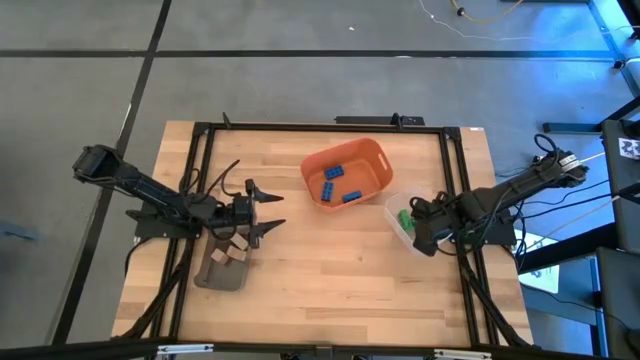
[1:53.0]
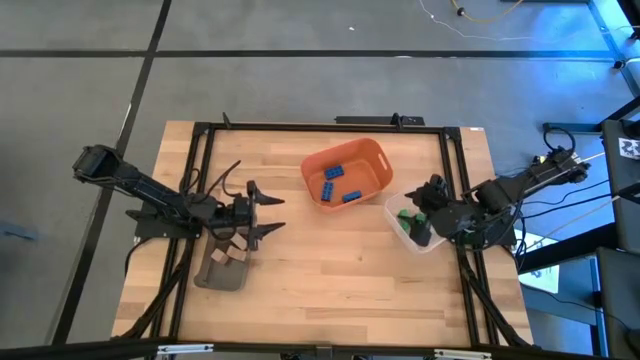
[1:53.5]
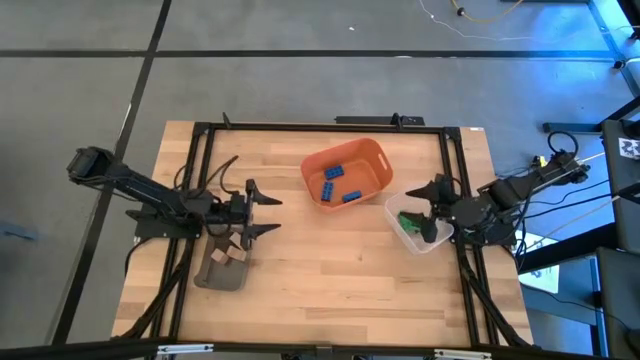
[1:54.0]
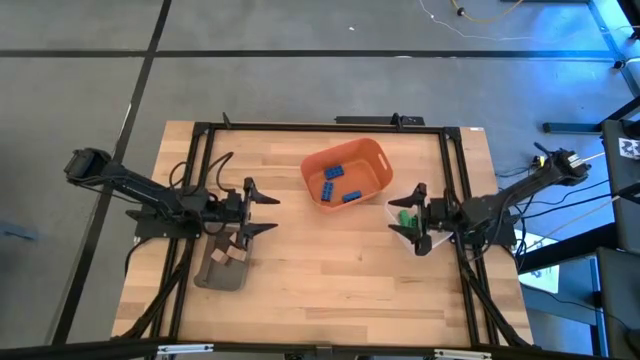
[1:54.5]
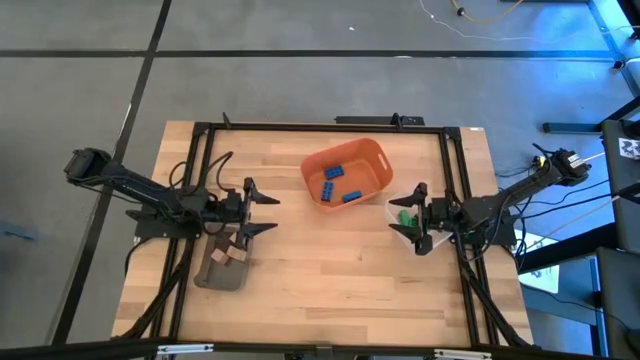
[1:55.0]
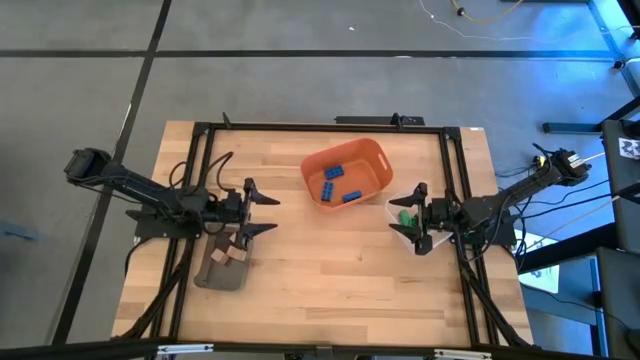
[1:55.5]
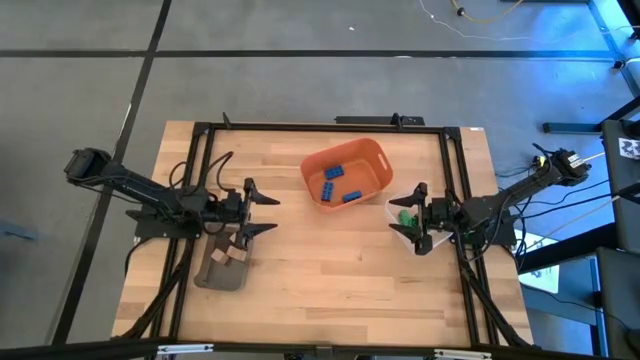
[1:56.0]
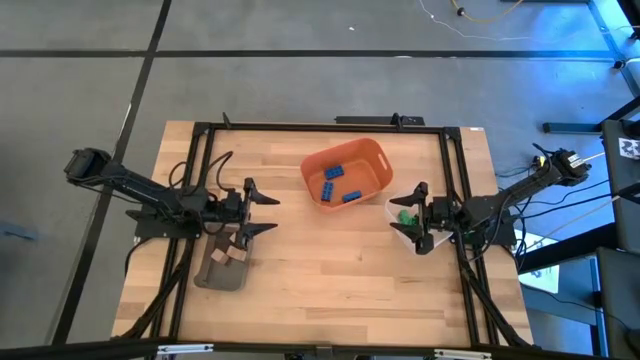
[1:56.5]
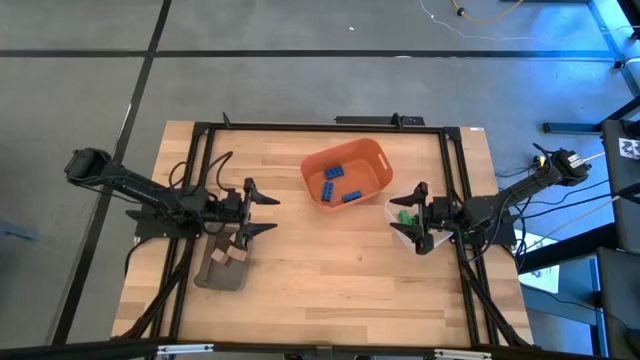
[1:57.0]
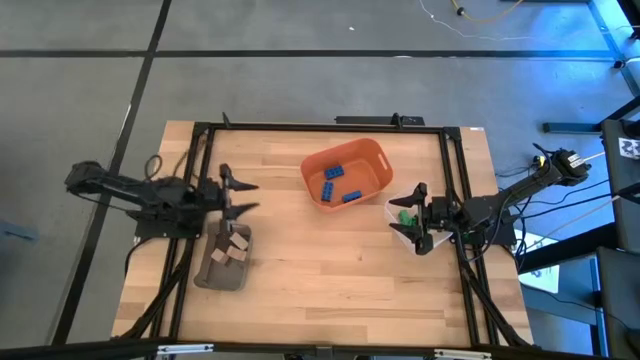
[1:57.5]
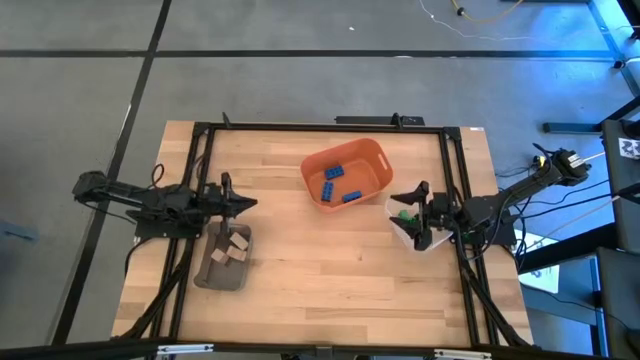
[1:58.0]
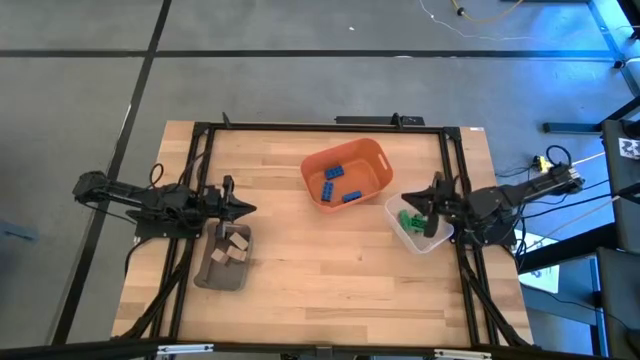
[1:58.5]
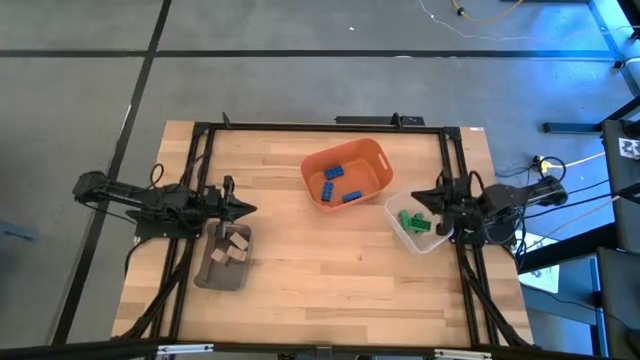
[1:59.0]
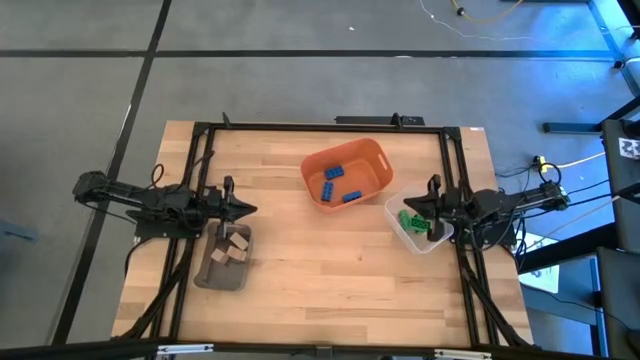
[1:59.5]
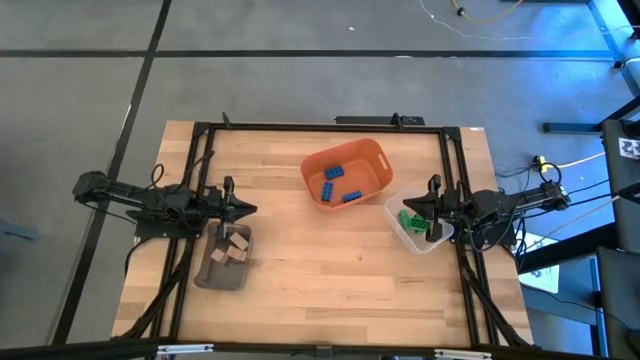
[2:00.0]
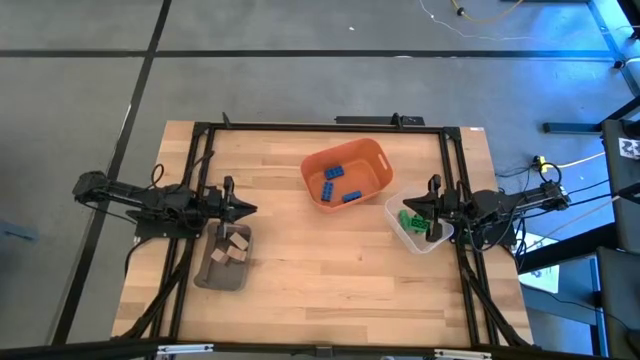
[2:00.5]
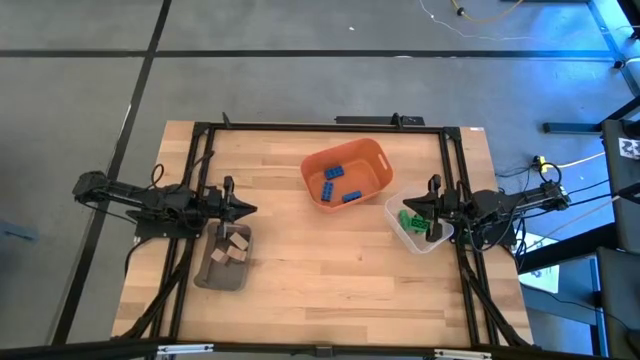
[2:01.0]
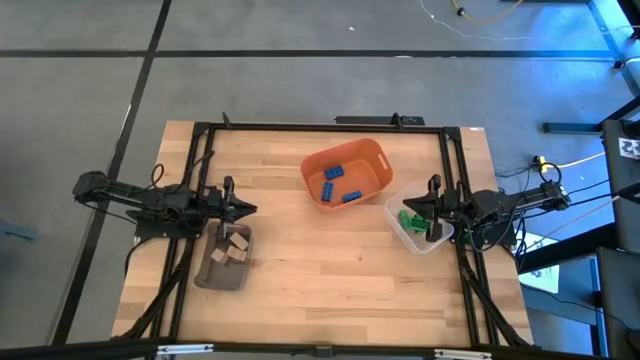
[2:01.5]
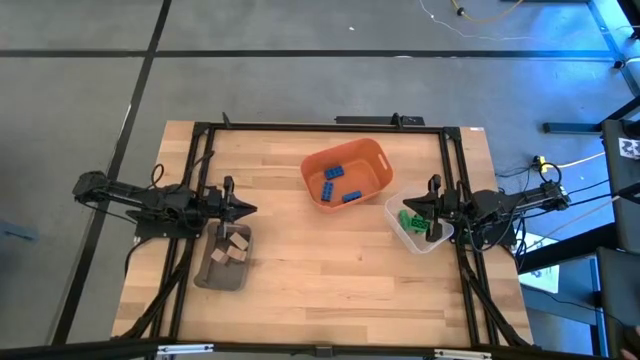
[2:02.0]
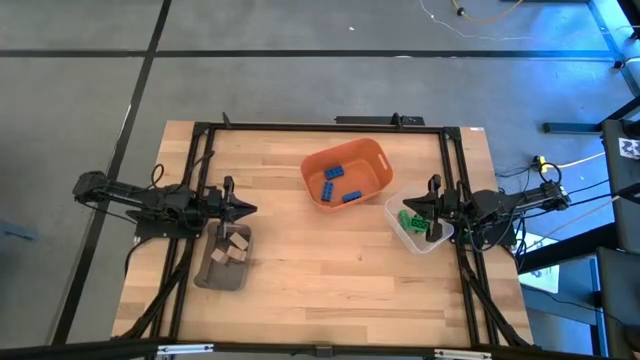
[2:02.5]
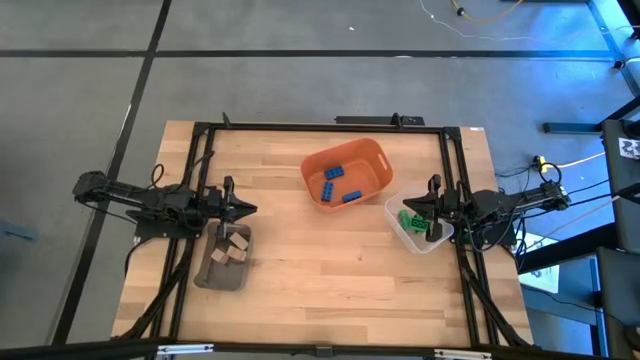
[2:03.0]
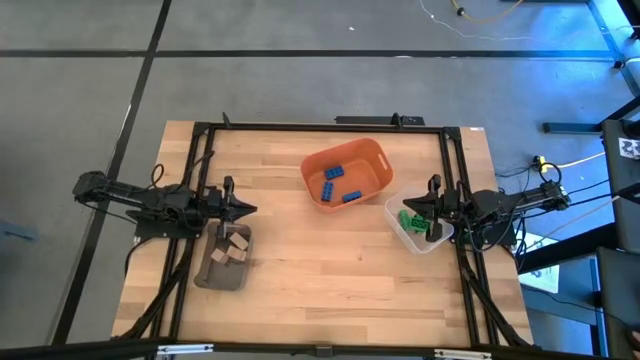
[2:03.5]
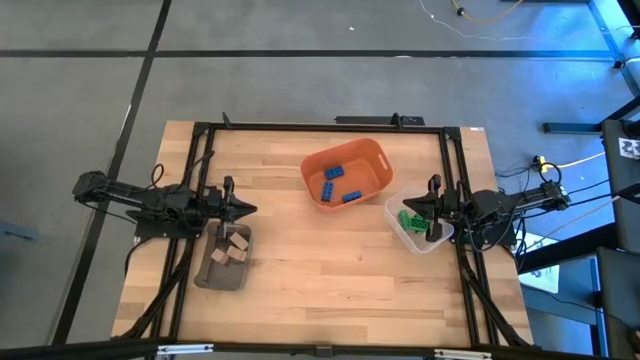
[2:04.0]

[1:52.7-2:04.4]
Task: Sort & place blocks by color
Return to Home Position

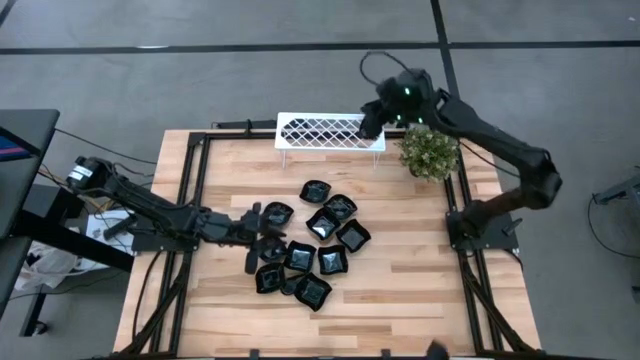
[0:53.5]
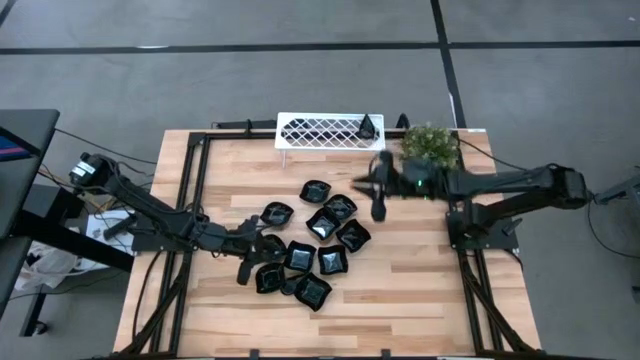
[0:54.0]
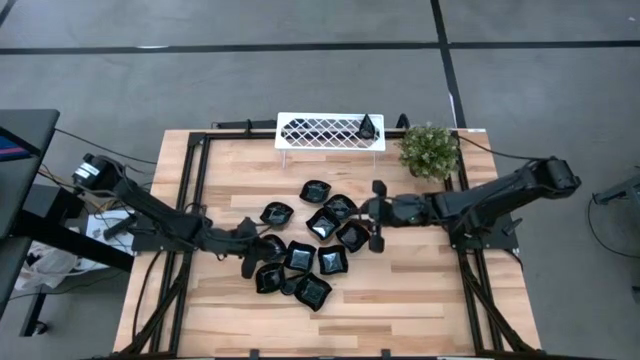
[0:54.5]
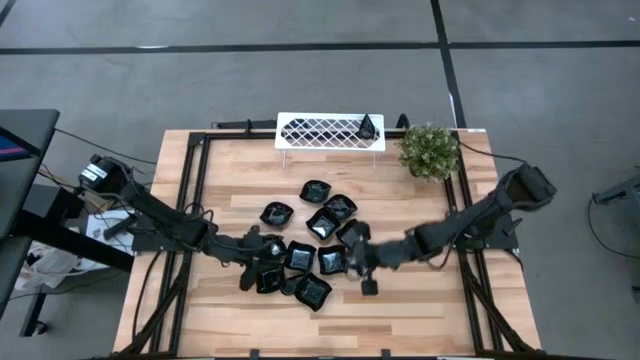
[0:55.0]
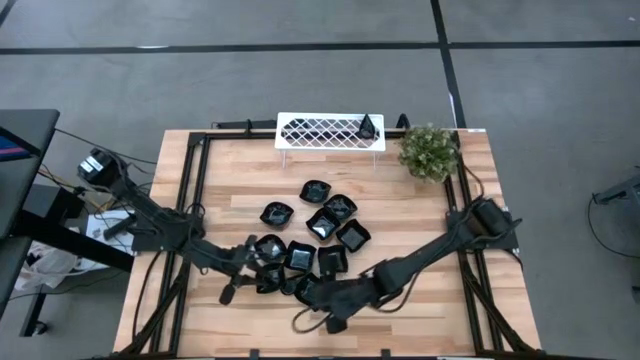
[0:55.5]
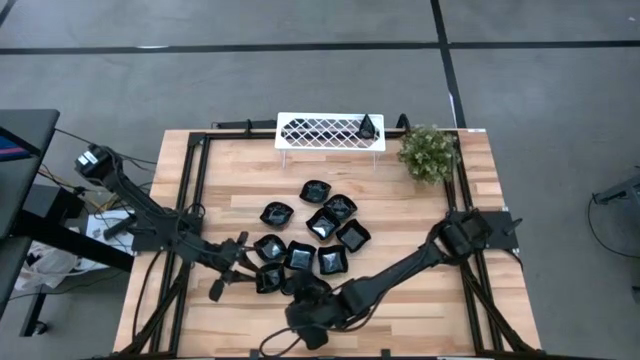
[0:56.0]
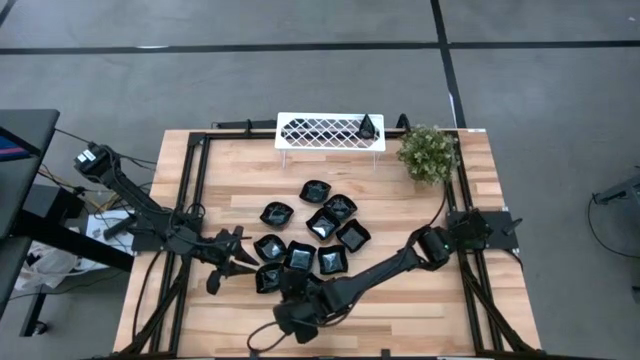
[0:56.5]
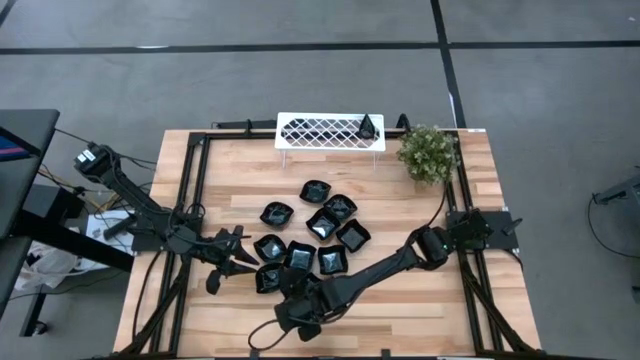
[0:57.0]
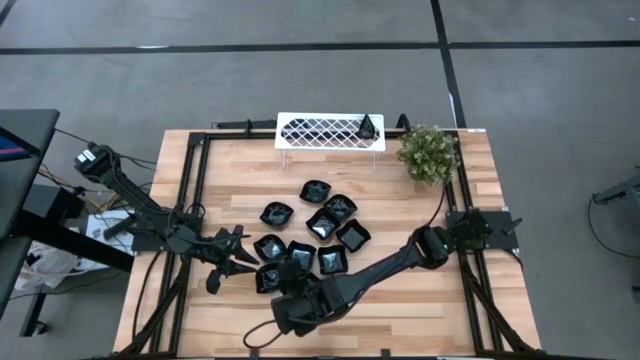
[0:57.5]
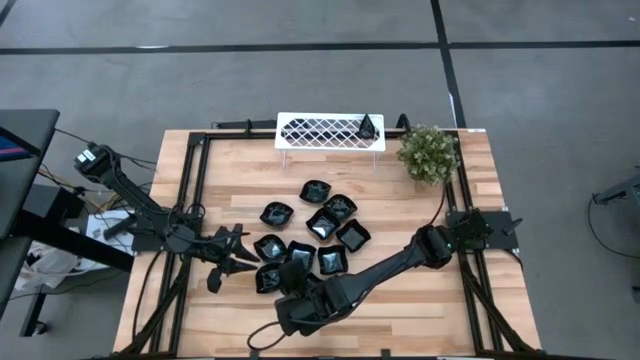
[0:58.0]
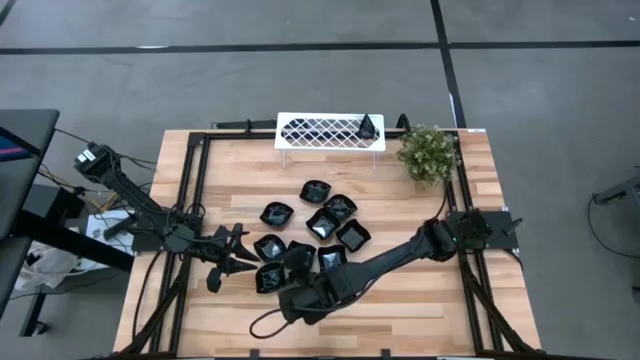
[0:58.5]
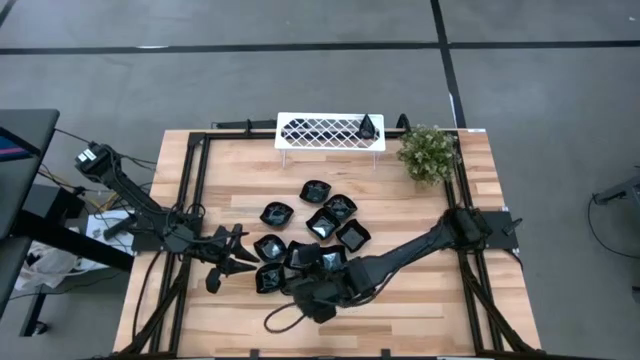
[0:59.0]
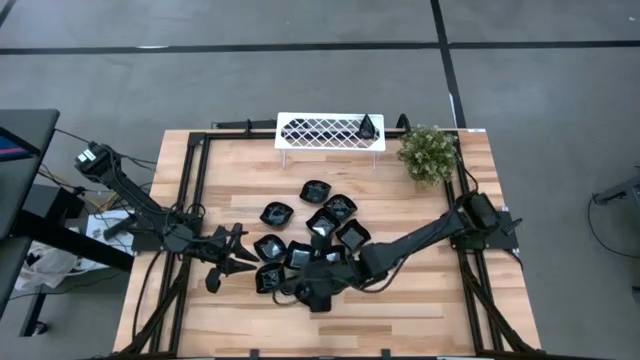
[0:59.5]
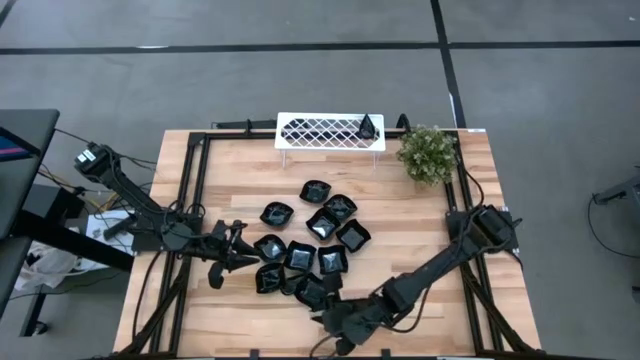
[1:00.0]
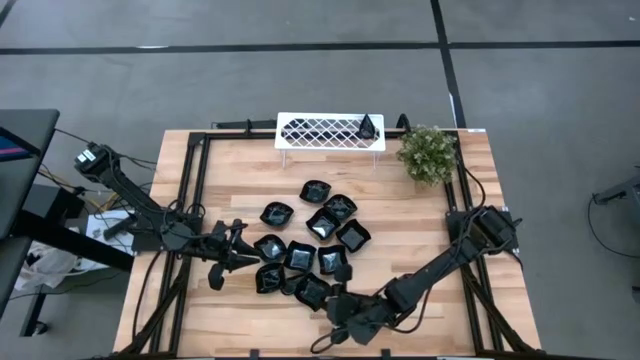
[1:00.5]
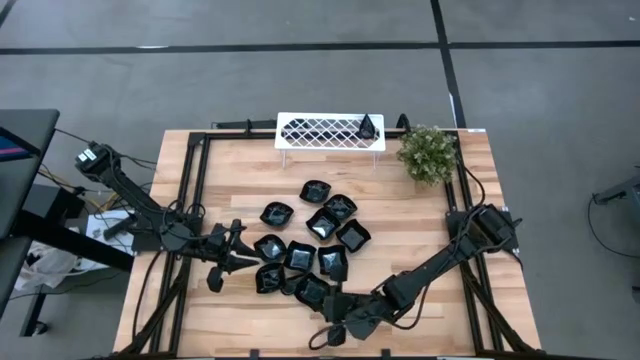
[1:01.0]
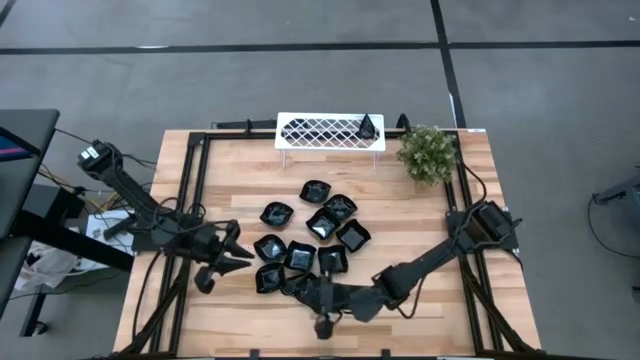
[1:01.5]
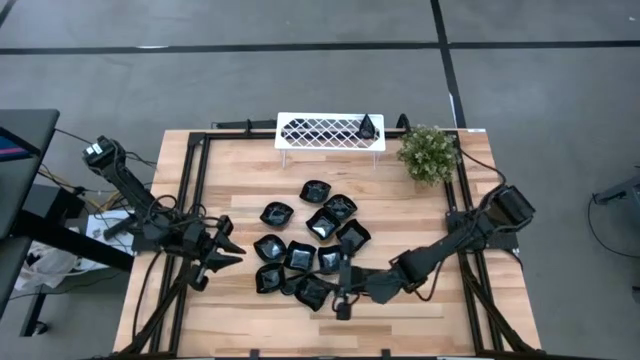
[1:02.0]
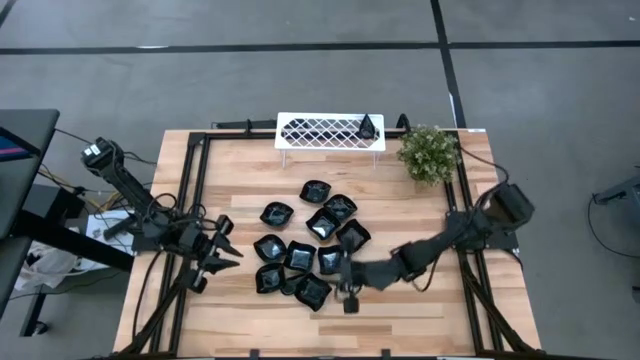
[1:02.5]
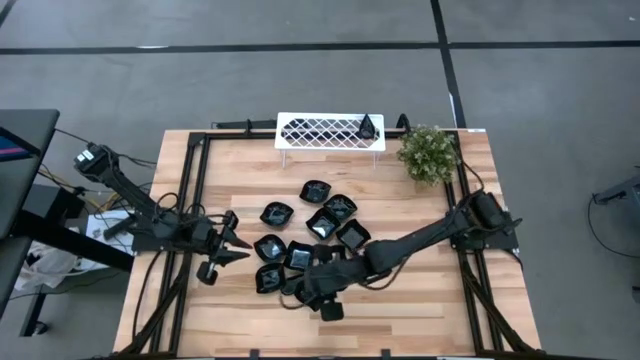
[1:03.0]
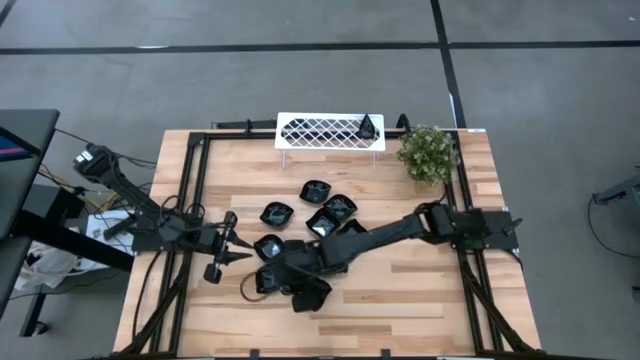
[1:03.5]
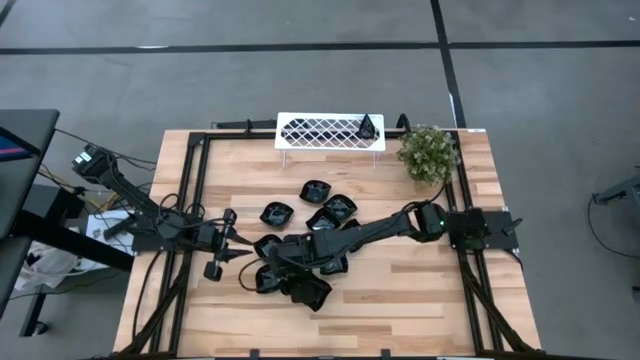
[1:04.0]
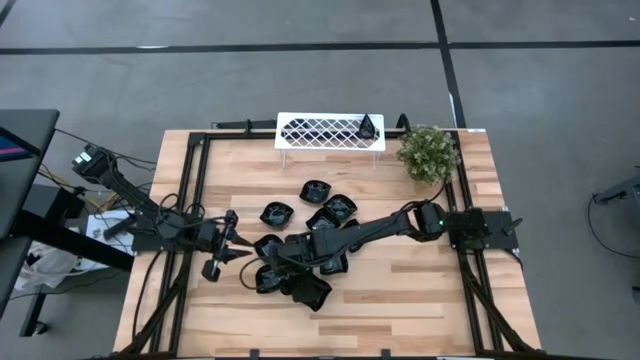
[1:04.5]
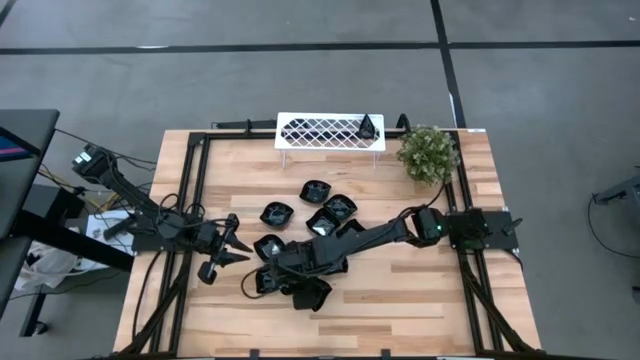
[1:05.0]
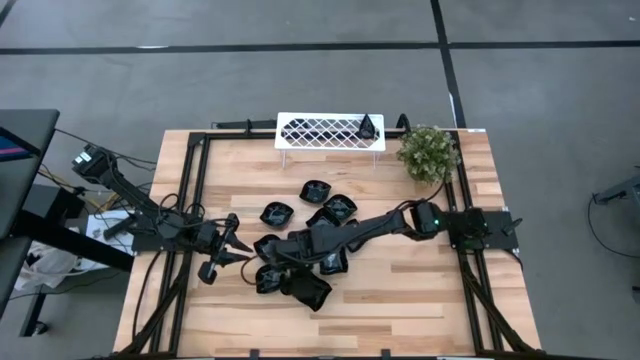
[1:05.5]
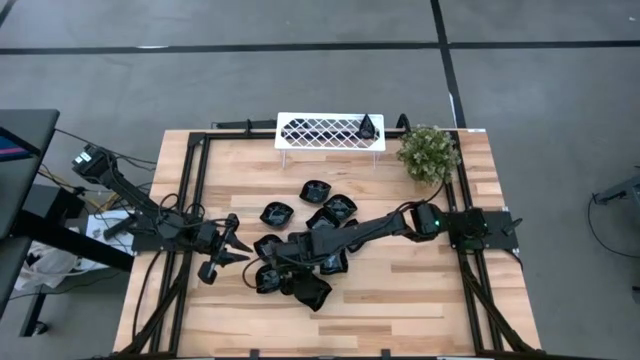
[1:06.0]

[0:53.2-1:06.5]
Task: Pick & Place Mini shaped plates
Stack the drop-shaped plate on top of the drop-shaped plates on the shelf
